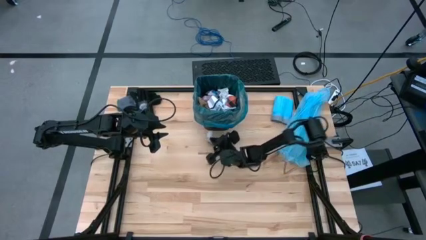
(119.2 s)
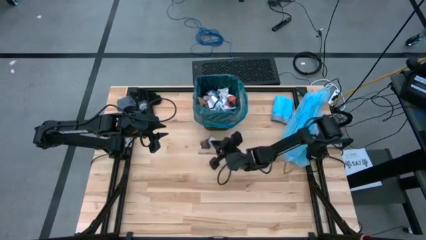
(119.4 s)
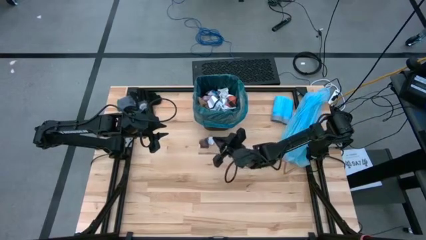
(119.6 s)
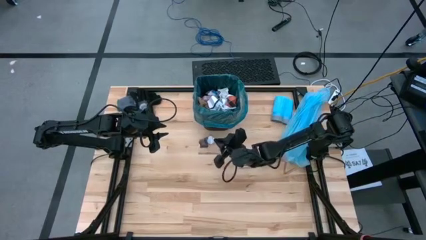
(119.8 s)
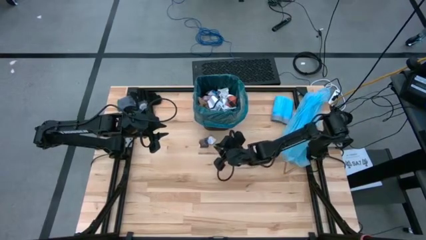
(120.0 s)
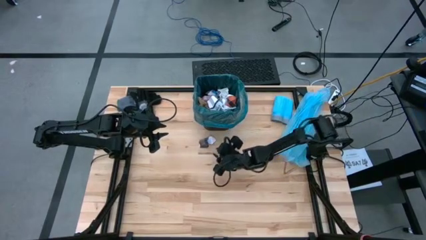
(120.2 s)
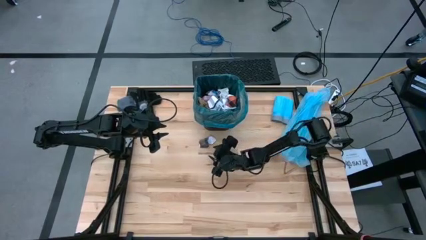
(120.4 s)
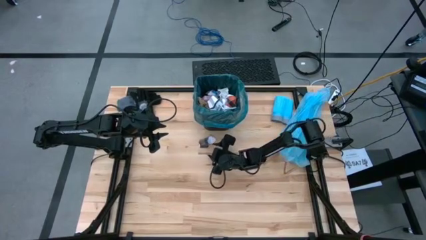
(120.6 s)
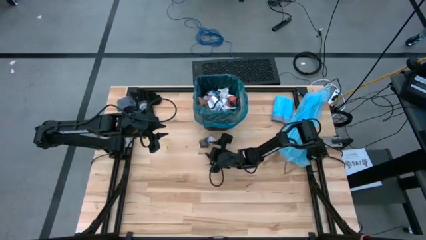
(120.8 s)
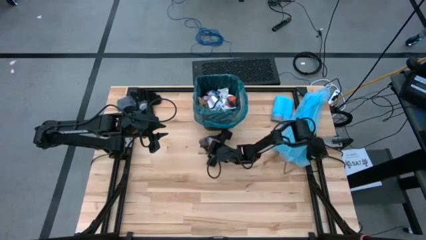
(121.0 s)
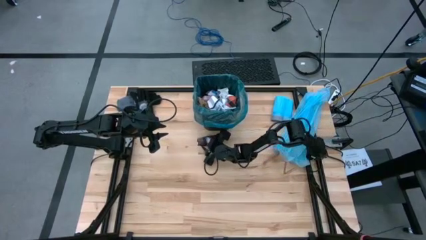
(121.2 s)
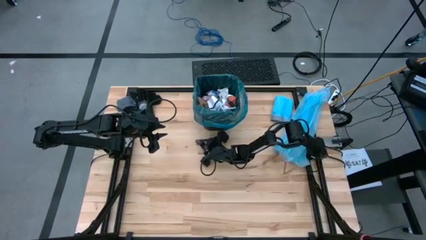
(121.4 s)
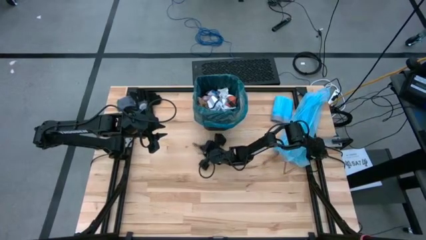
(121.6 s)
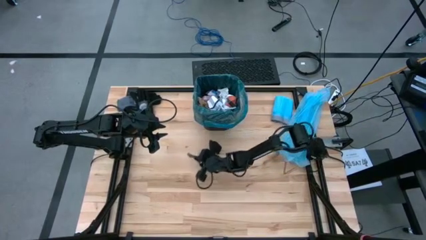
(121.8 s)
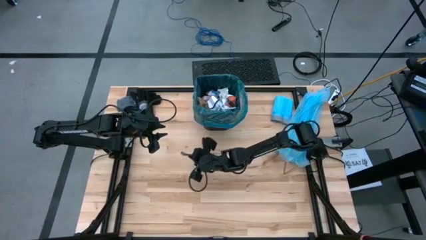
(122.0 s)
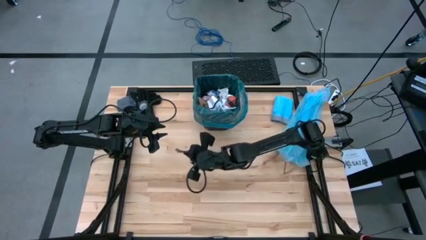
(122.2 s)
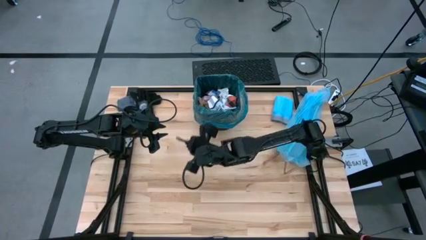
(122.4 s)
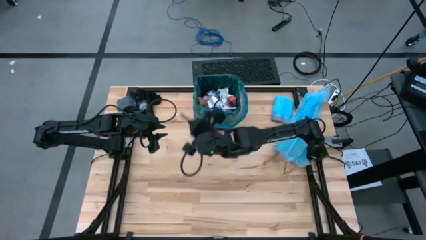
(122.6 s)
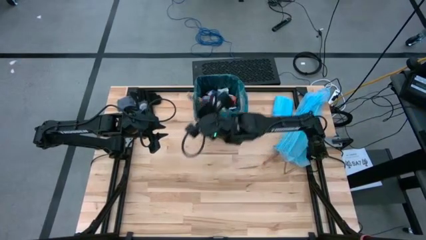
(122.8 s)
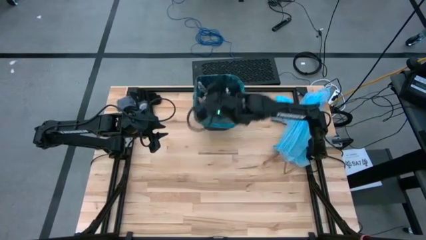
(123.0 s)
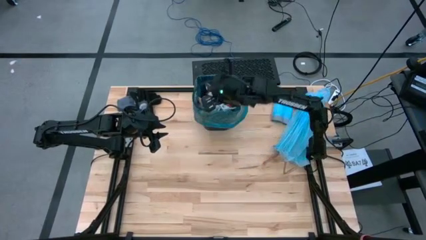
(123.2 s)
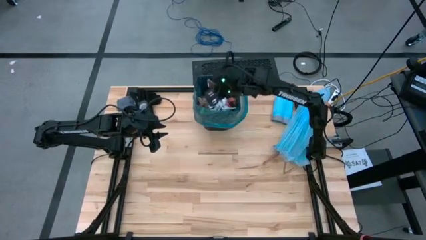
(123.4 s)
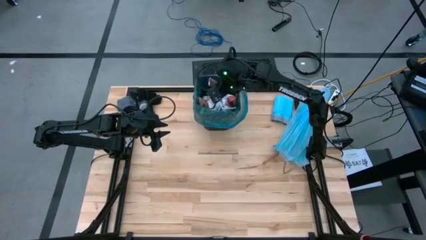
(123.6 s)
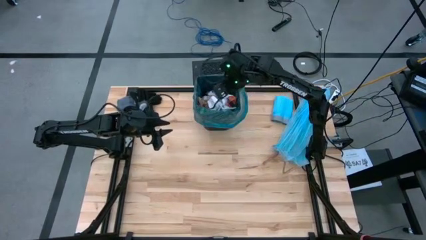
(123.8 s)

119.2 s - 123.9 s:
Task: place trash/remove bag and relplace
Put the white paper into the trash bin

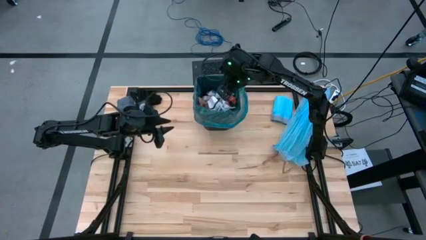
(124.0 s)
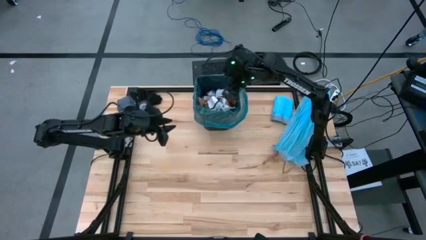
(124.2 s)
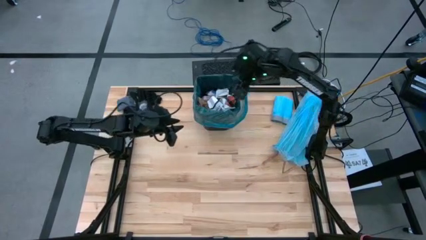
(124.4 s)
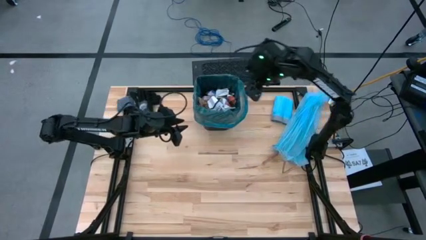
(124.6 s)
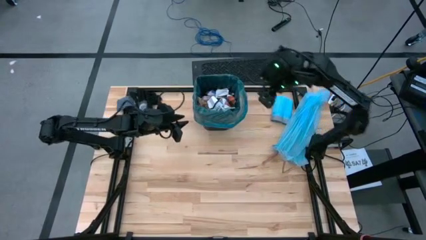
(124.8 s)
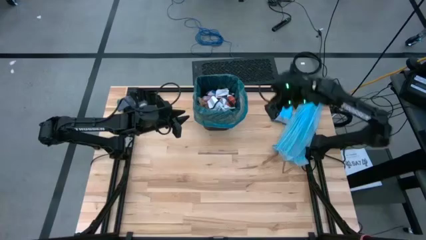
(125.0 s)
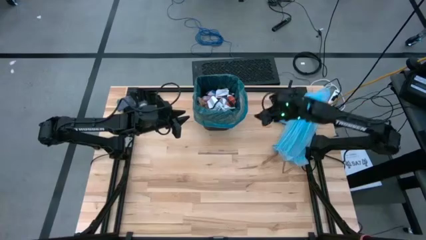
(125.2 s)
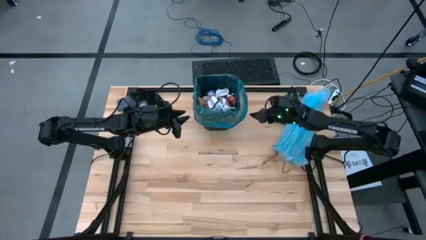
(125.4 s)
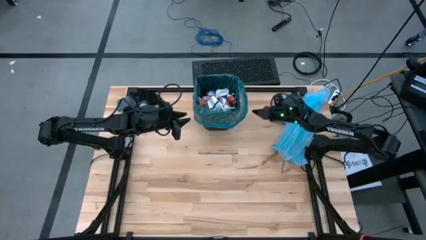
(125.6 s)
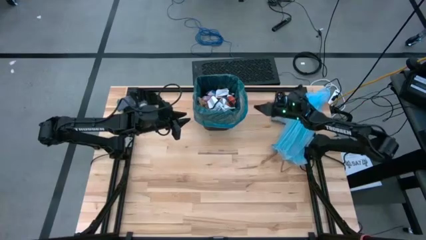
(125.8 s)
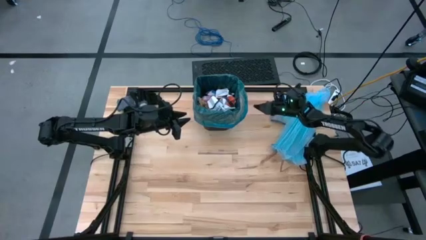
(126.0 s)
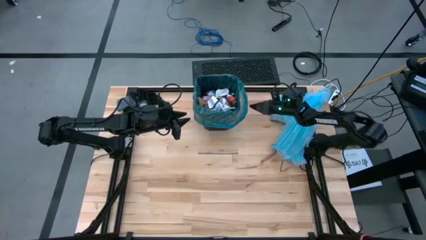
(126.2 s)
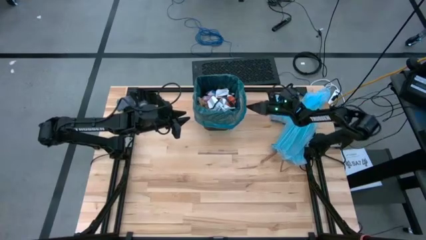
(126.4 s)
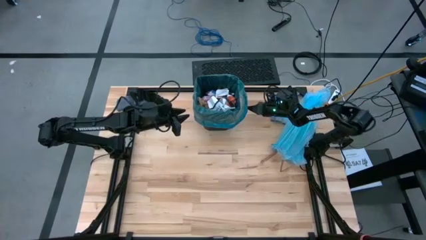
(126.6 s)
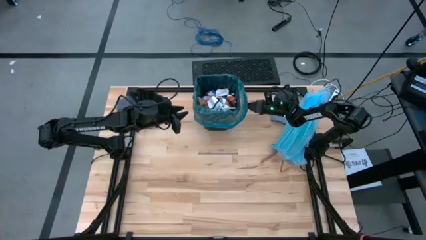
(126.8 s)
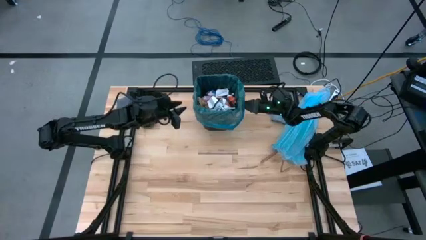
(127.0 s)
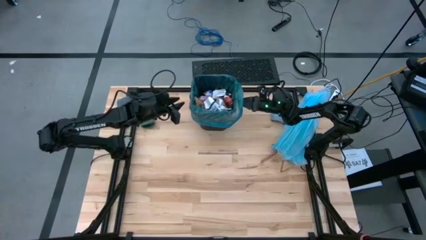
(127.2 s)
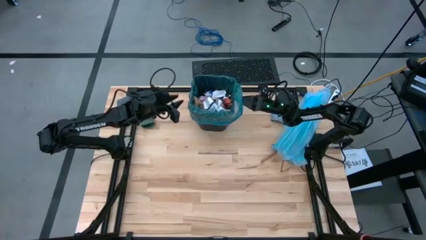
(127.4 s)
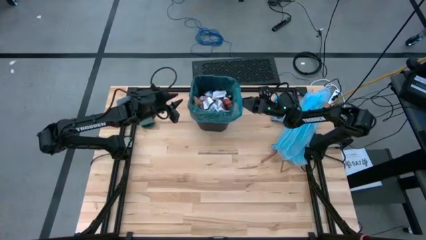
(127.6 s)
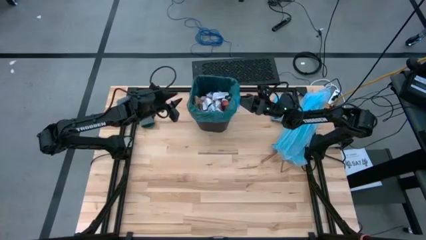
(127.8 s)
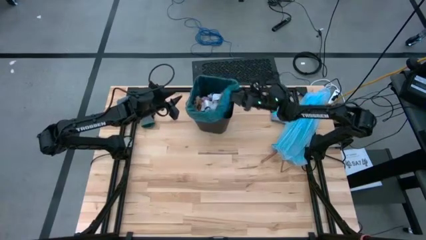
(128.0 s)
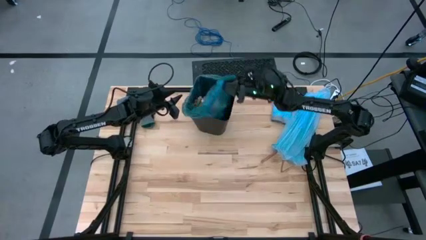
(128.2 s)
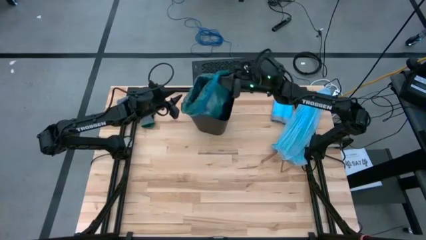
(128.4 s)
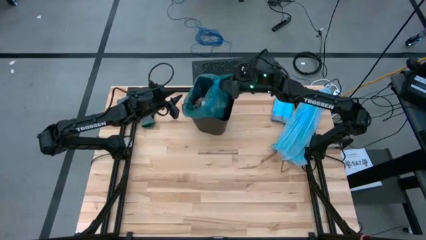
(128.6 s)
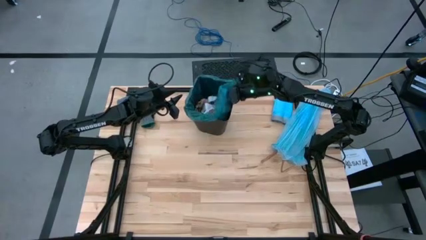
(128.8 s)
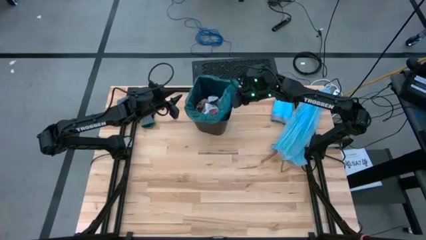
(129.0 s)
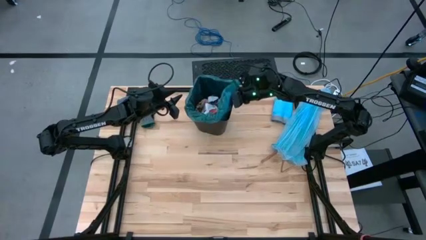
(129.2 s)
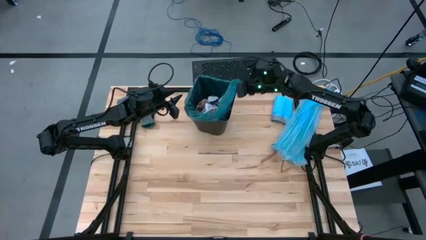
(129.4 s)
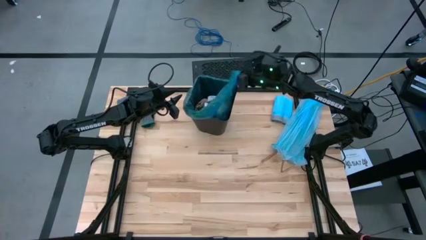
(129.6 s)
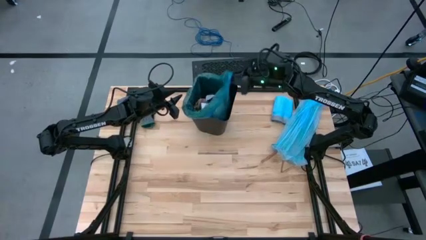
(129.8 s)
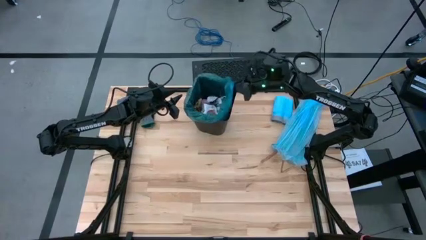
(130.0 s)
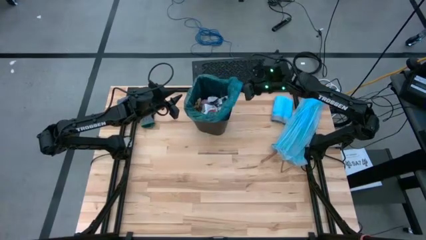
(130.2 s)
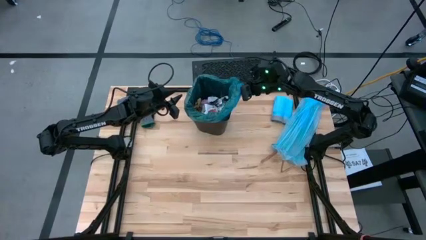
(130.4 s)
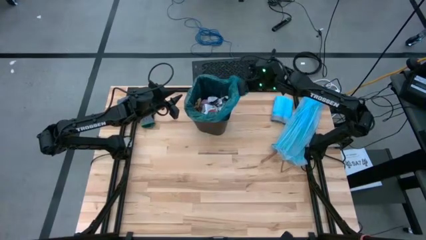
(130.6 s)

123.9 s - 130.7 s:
Remove the blue trash bag from the trash bin

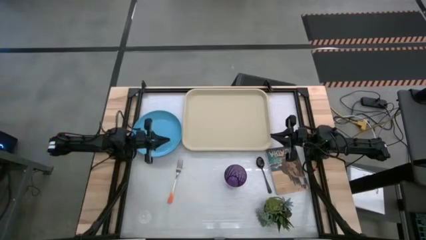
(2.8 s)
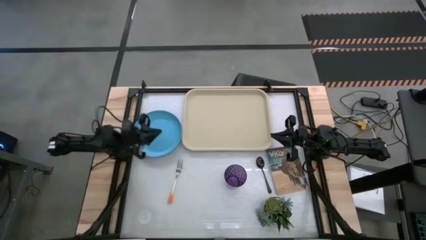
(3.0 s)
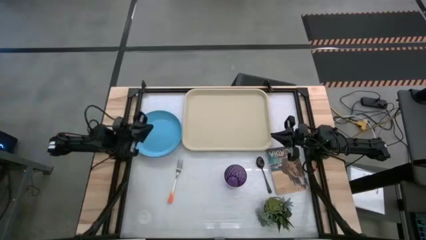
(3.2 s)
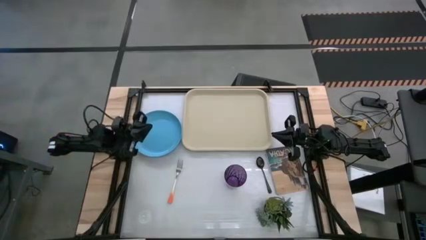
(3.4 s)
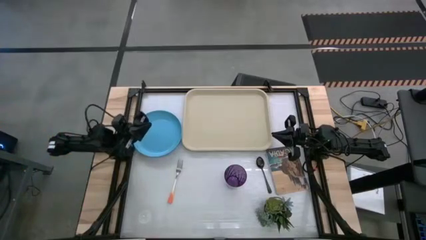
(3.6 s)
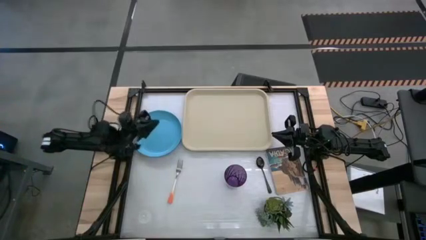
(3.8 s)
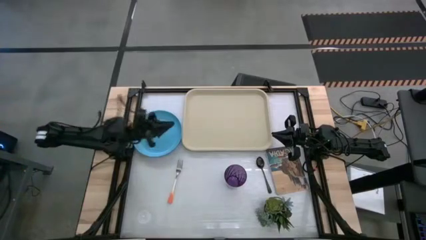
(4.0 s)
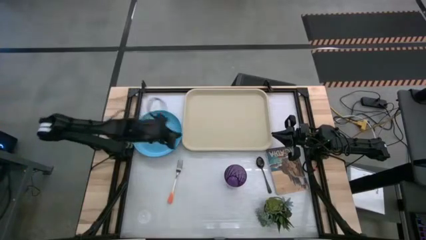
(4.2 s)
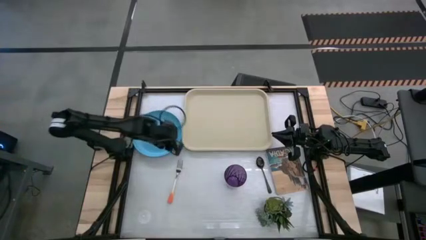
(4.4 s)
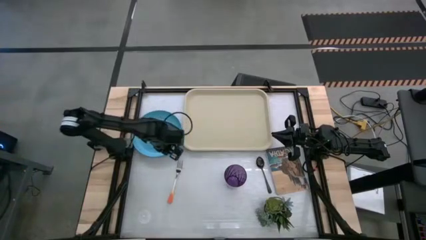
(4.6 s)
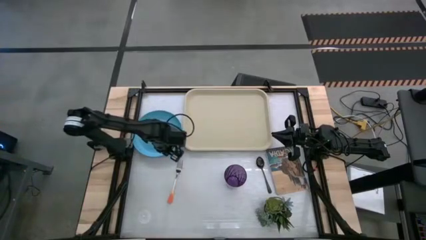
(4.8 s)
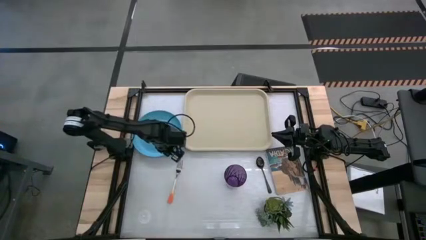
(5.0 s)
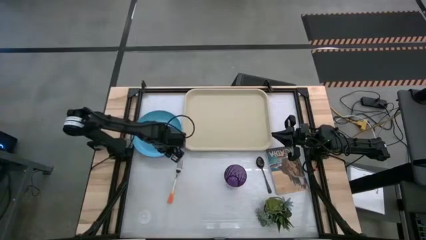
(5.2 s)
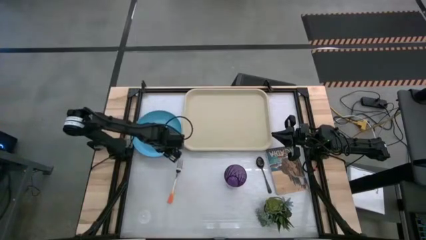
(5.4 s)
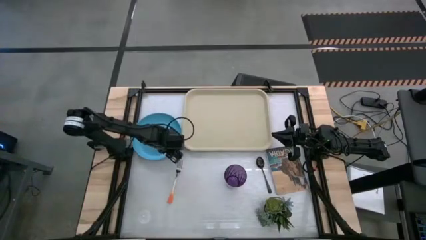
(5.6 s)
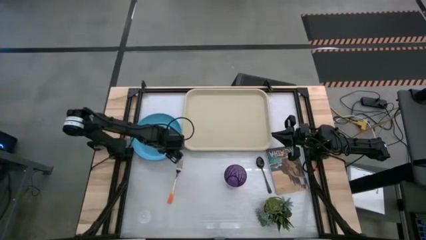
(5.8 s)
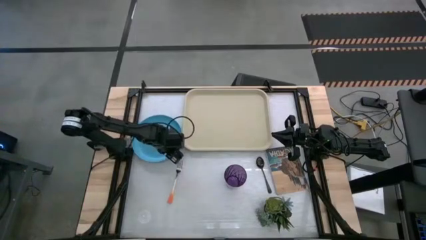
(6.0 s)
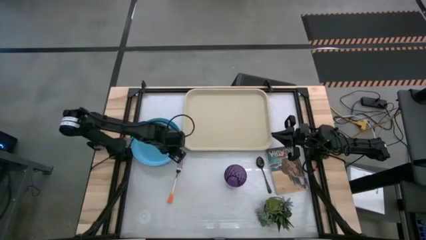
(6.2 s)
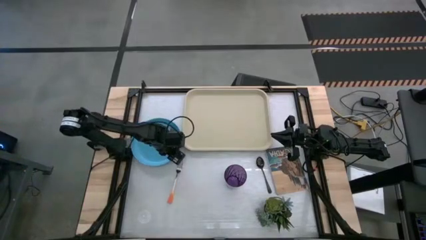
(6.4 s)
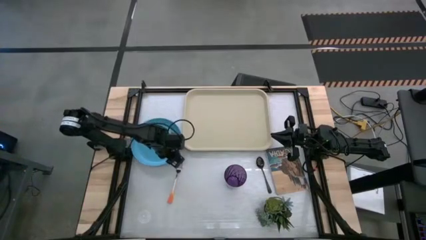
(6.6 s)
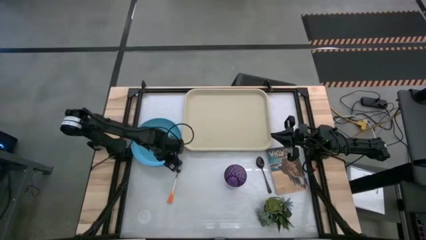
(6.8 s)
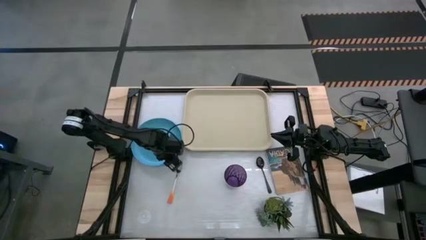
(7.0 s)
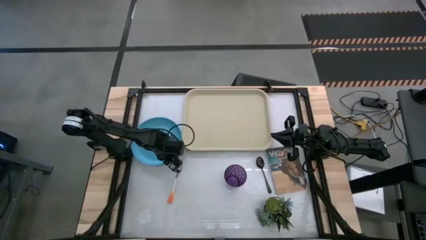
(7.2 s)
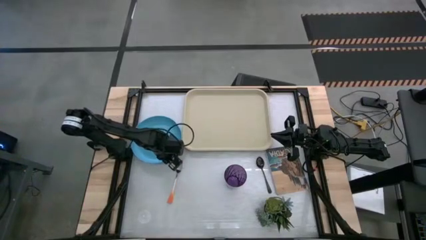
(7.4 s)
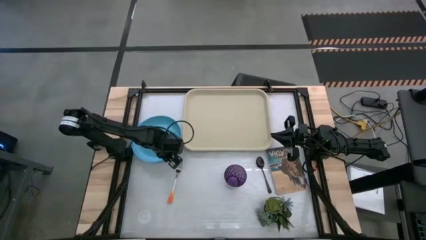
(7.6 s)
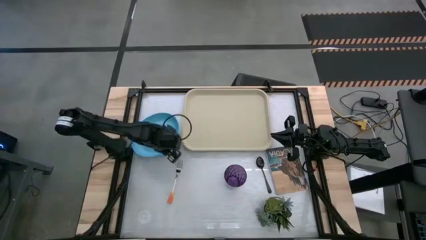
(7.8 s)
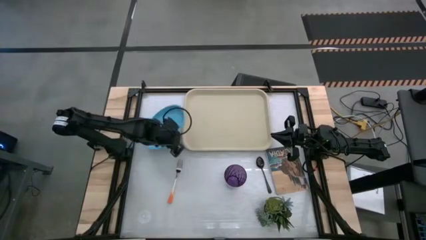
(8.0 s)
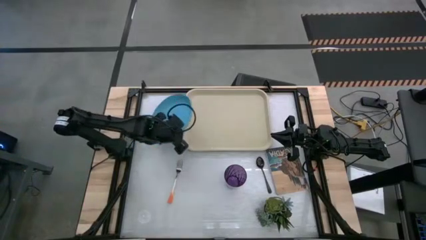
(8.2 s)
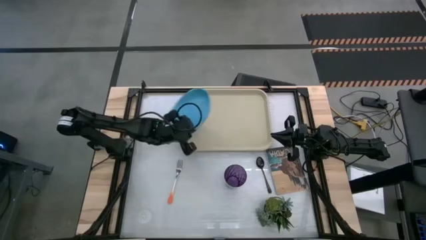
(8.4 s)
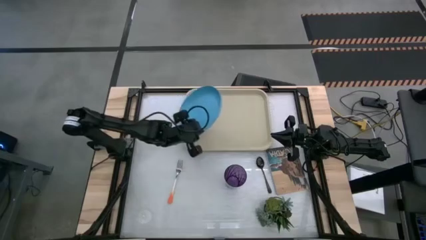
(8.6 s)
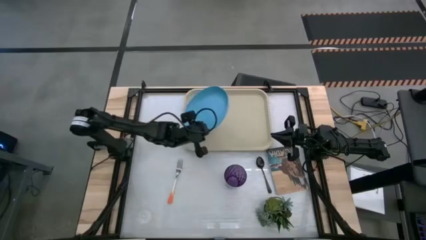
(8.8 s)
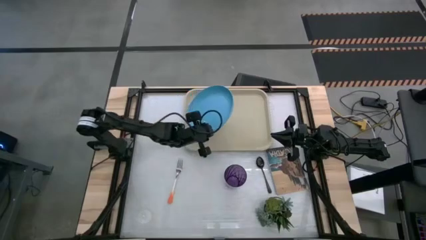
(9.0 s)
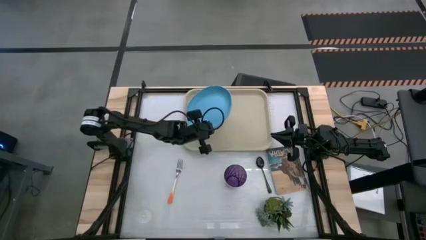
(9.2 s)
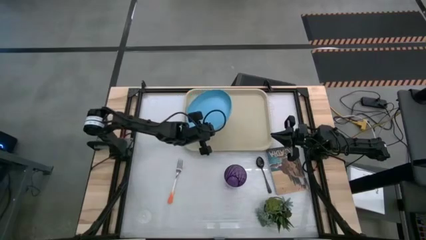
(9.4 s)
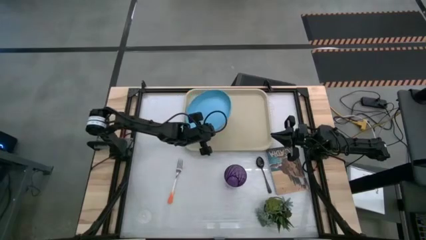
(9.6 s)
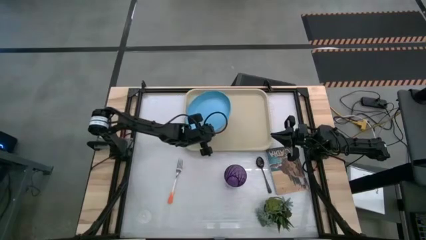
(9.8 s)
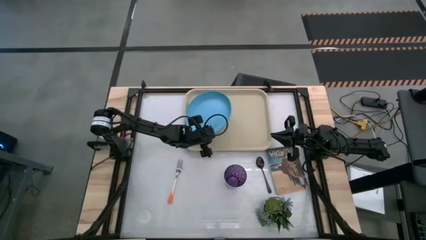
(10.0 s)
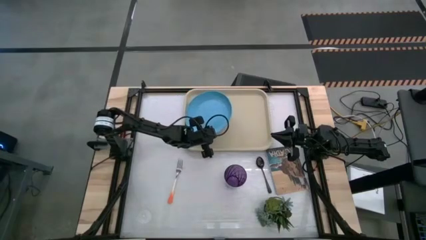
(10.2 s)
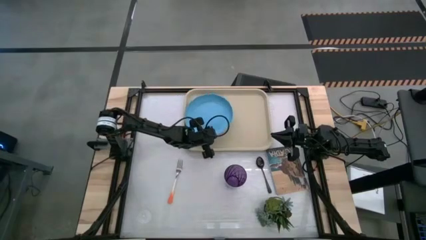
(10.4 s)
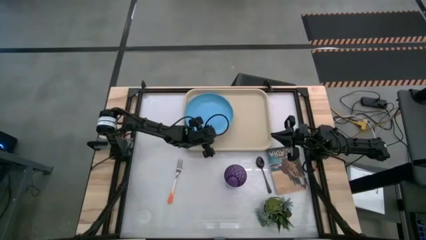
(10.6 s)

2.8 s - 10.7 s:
Task: Pick and place plate/cup/fork/spoon on tray
Put the blue plate on the left of the tray
